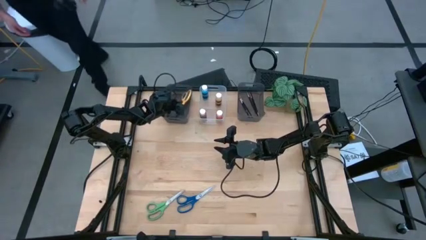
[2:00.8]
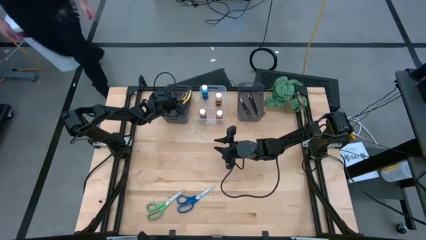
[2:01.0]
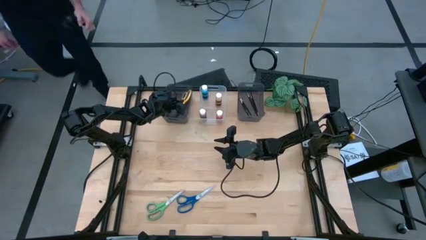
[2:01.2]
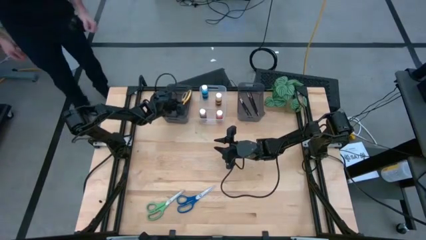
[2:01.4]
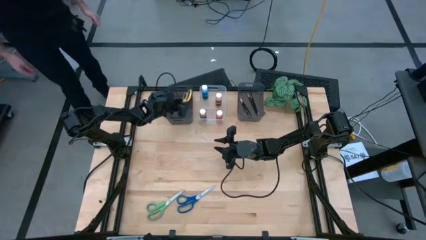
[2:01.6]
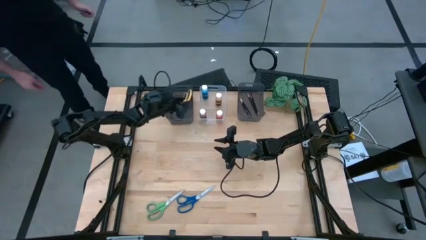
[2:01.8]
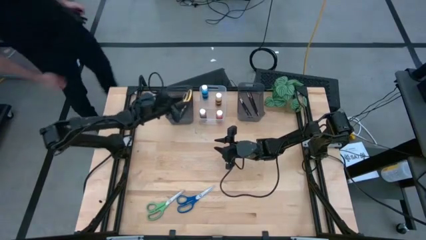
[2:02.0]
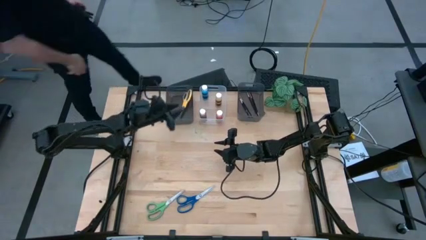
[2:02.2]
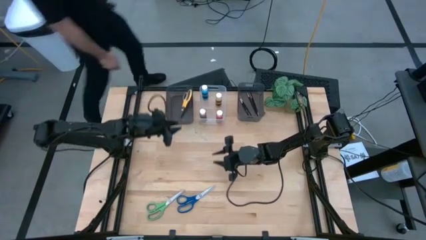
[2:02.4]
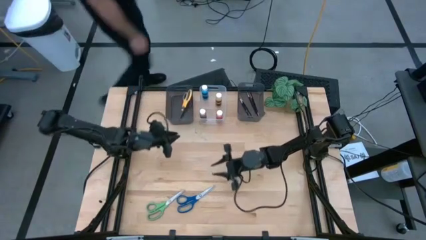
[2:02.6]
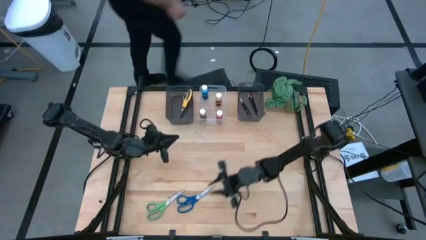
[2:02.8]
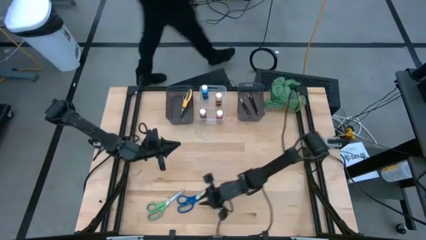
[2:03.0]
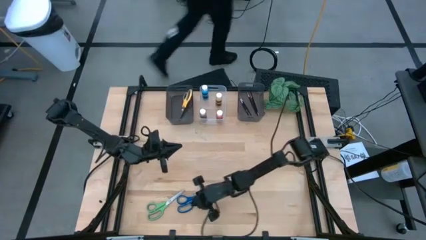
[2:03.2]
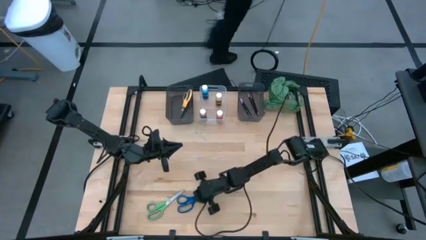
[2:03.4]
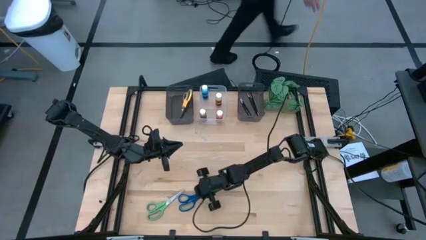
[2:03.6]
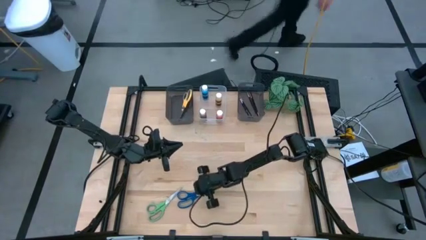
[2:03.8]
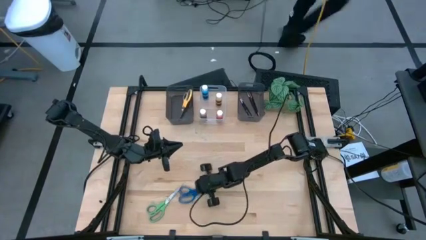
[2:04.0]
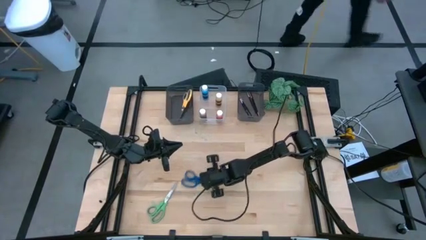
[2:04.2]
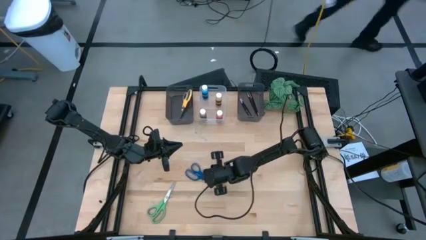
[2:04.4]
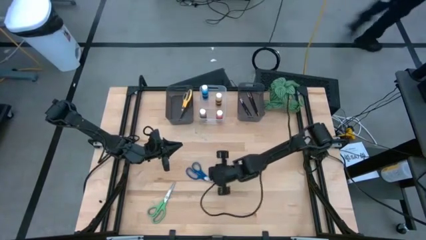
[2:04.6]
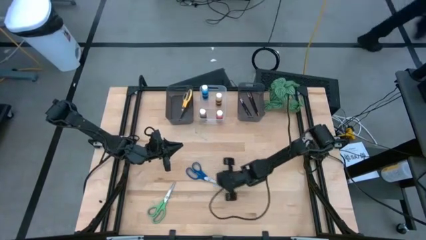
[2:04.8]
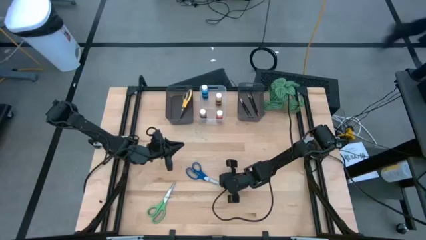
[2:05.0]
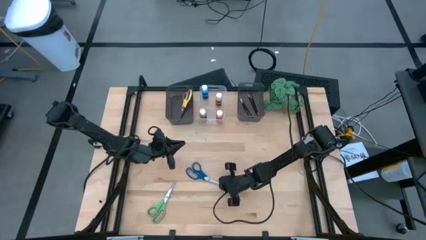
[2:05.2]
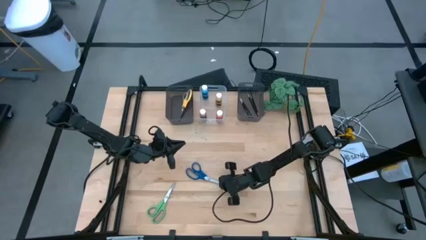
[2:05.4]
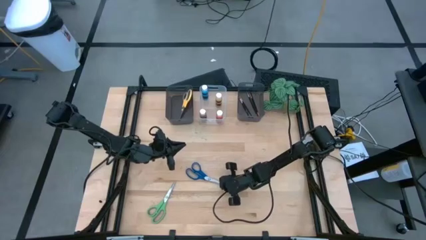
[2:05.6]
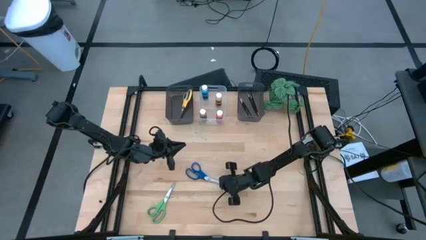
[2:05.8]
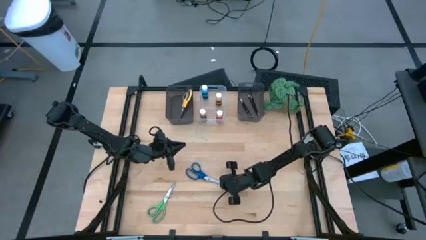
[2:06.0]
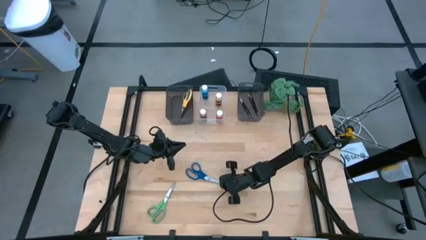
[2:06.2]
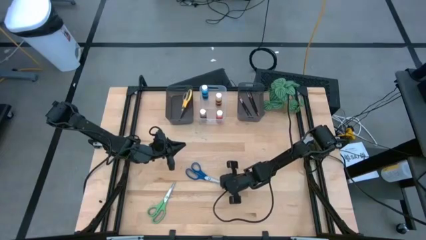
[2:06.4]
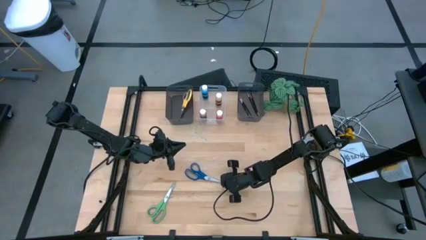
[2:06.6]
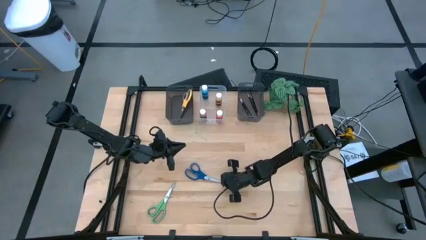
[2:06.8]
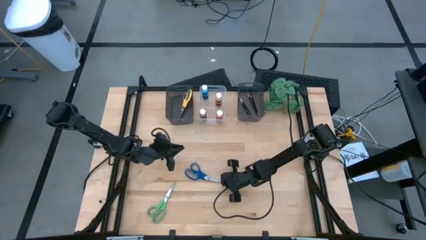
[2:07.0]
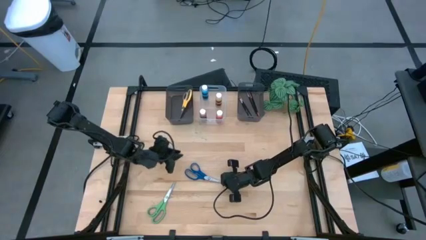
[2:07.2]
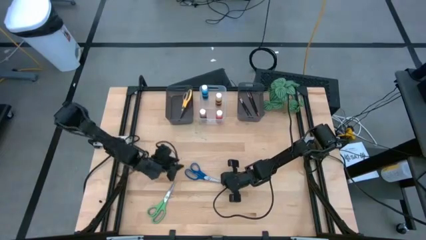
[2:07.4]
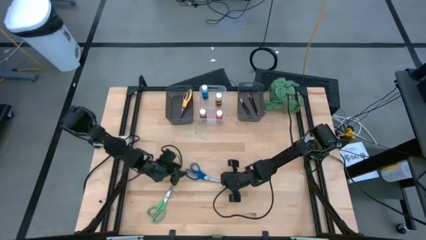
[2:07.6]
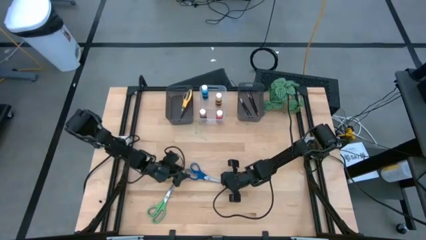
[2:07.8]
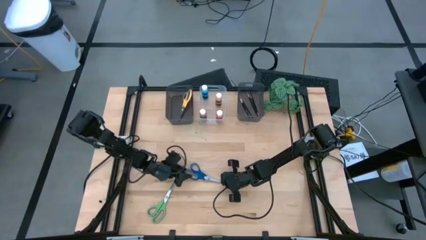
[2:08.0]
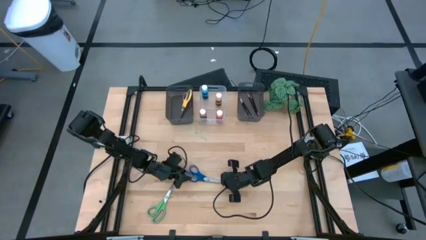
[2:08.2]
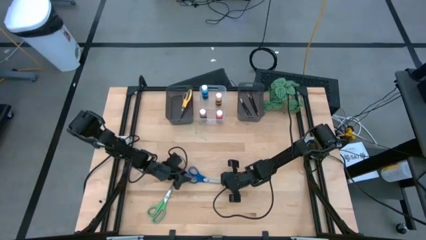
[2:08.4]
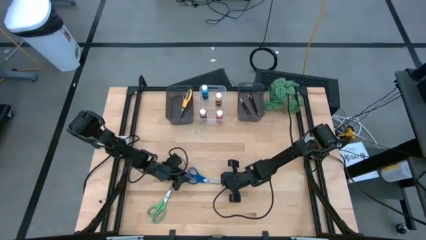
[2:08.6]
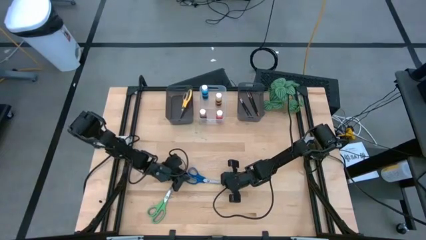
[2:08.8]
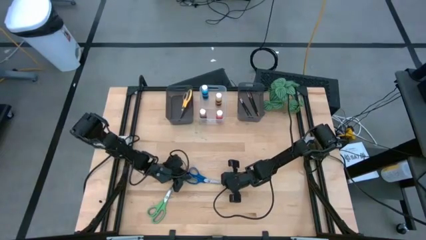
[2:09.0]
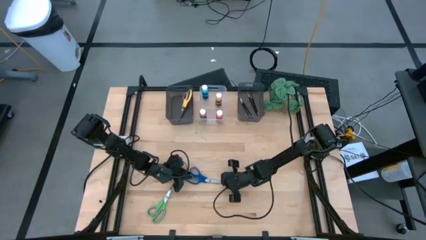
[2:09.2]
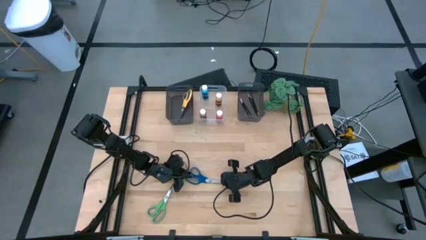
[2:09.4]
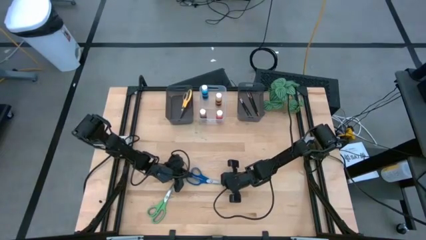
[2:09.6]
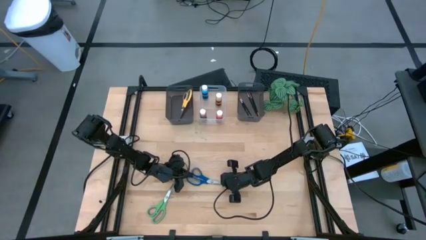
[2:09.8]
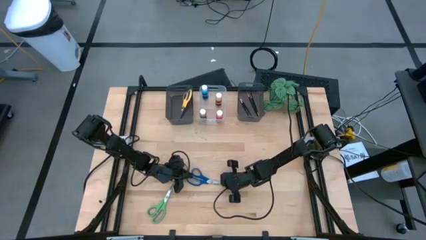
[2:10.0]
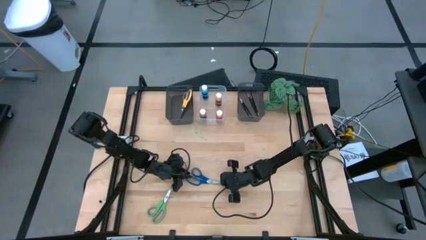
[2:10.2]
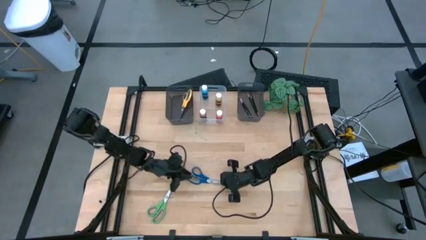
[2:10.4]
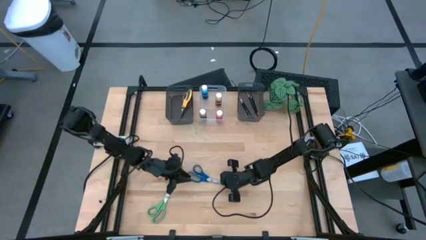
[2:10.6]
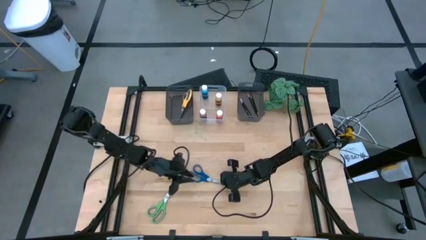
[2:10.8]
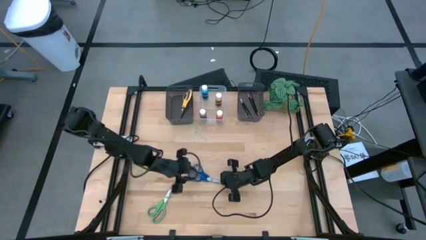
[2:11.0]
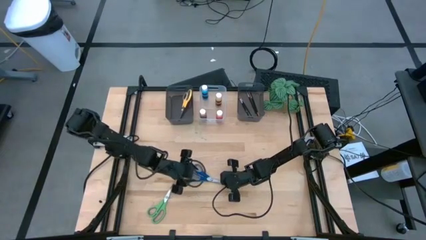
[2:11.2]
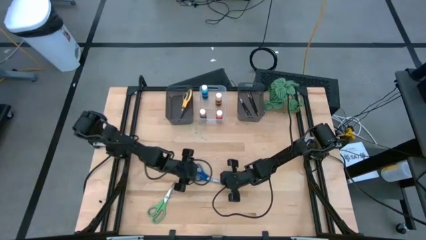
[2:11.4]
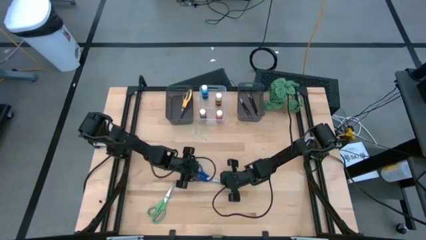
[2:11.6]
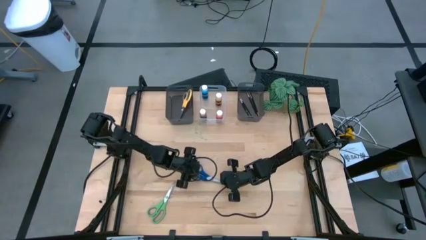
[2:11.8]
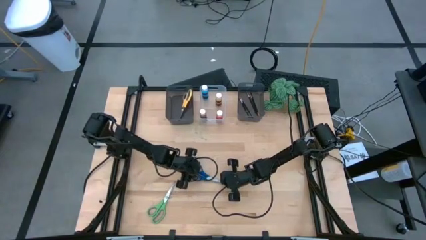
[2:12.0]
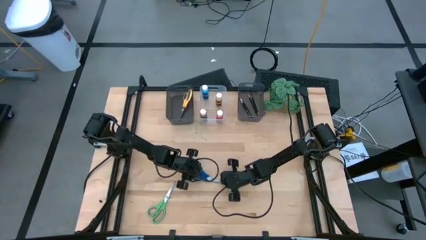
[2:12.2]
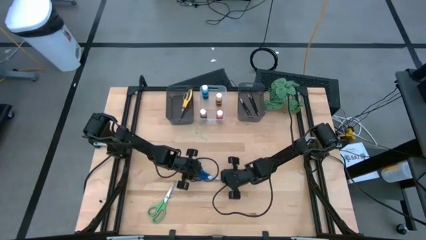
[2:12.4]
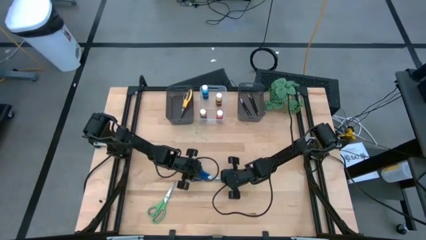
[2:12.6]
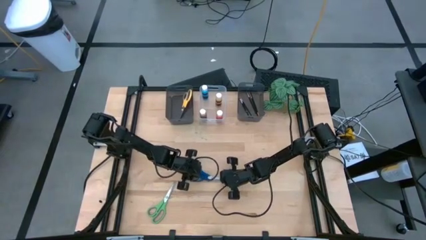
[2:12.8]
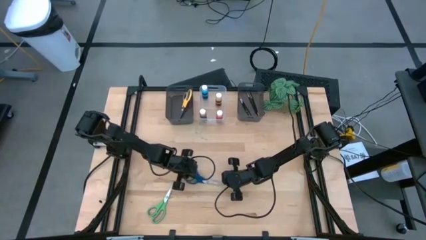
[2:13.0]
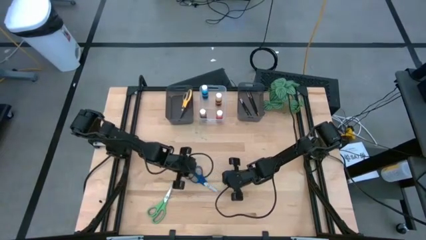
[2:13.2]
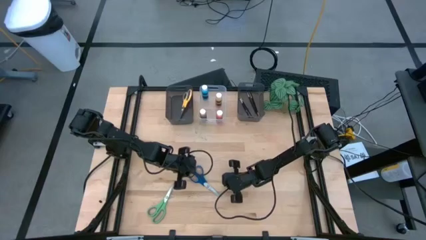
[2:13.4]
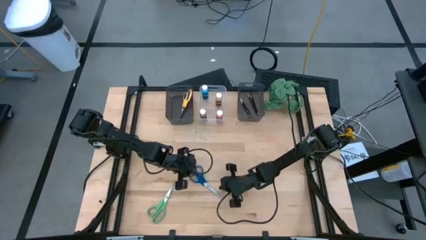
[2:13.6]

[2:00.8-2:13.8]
Task: Pick & Place Paint Supplies
Put the blue scissors into the left black bin
